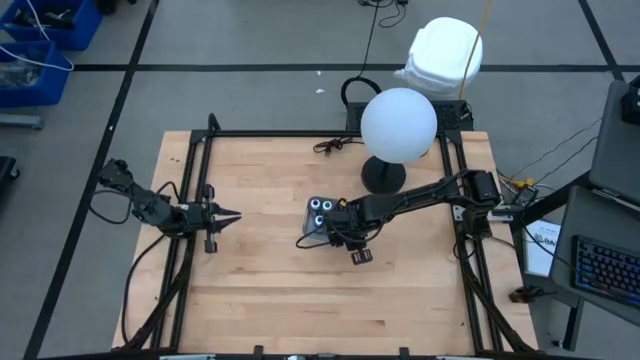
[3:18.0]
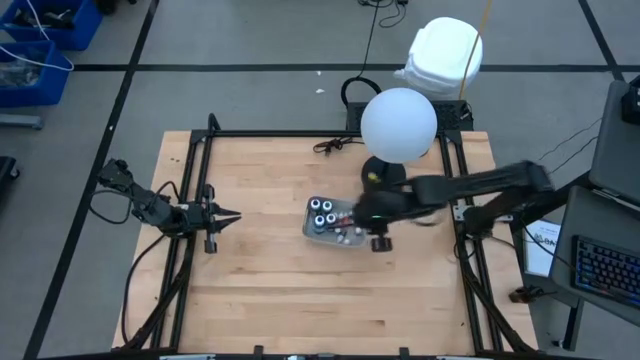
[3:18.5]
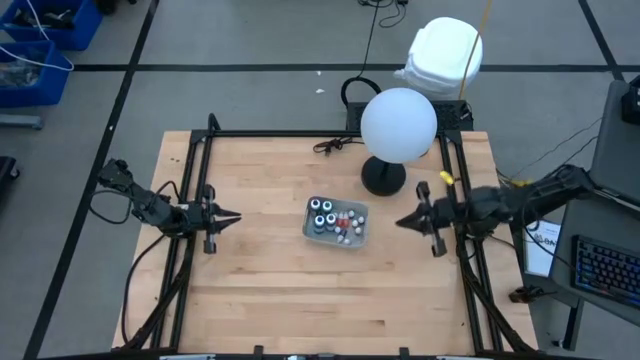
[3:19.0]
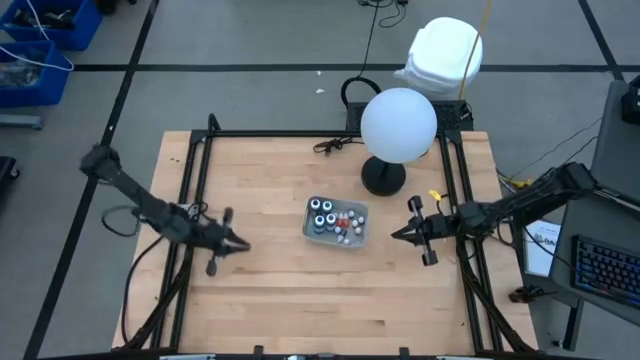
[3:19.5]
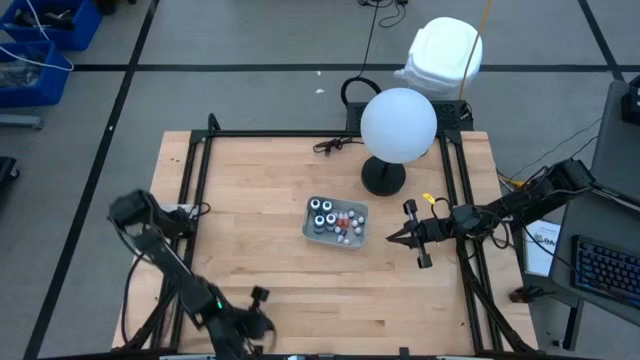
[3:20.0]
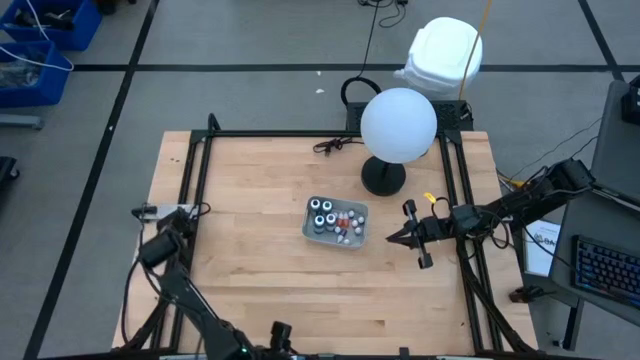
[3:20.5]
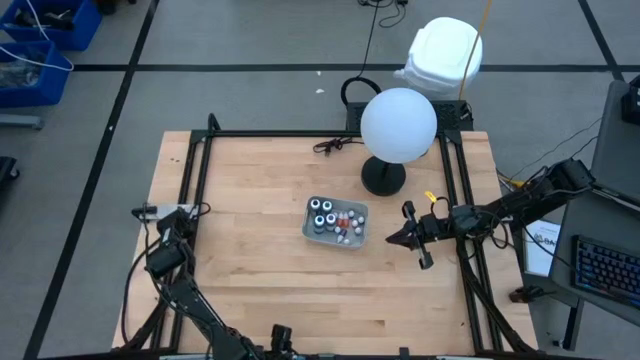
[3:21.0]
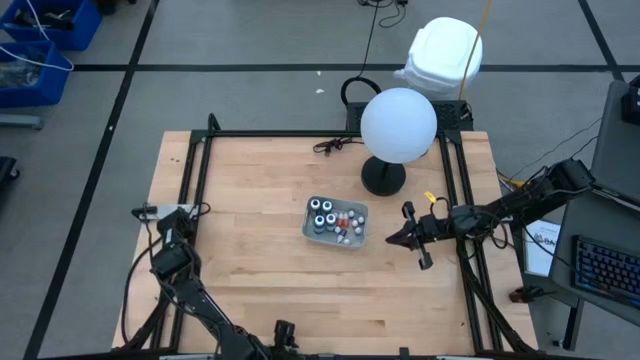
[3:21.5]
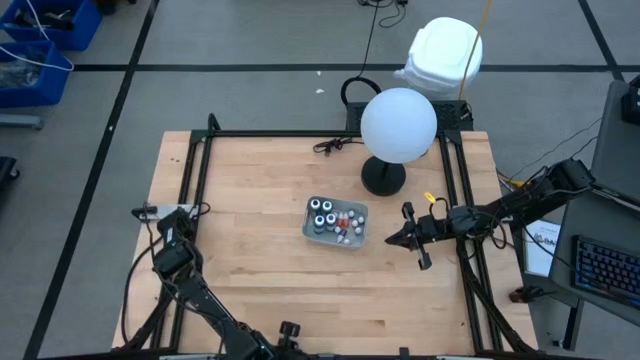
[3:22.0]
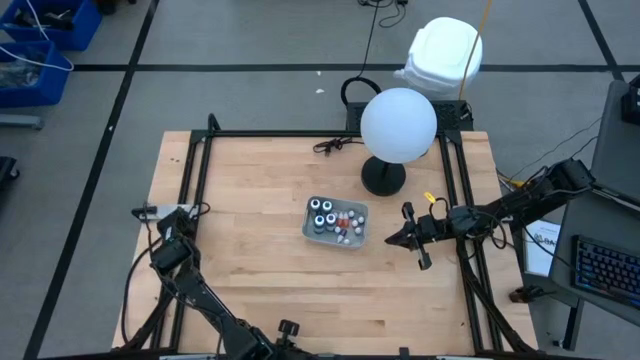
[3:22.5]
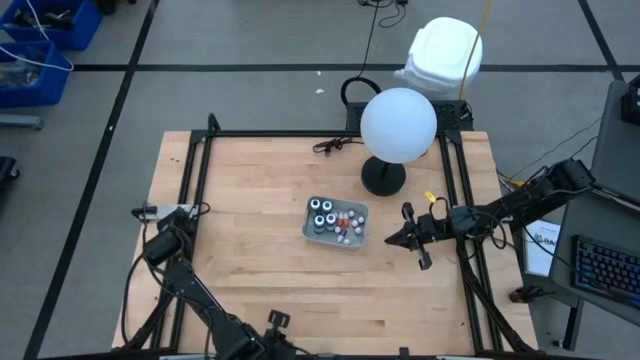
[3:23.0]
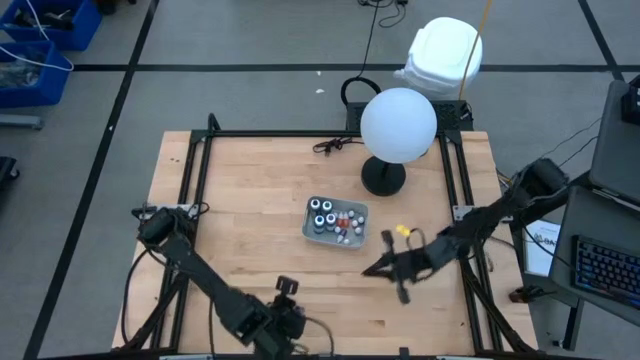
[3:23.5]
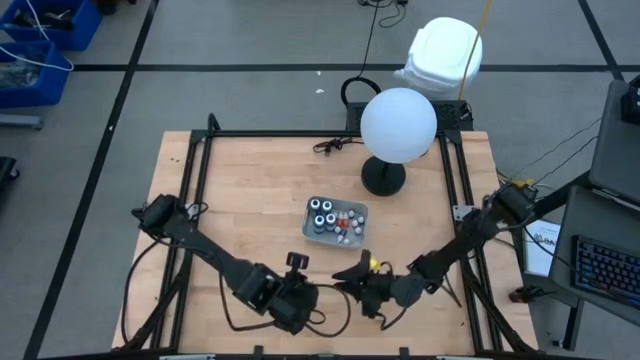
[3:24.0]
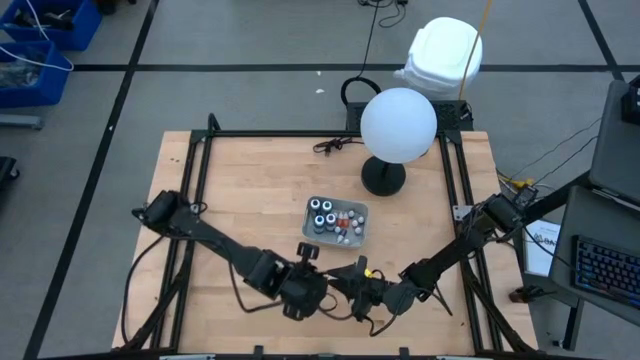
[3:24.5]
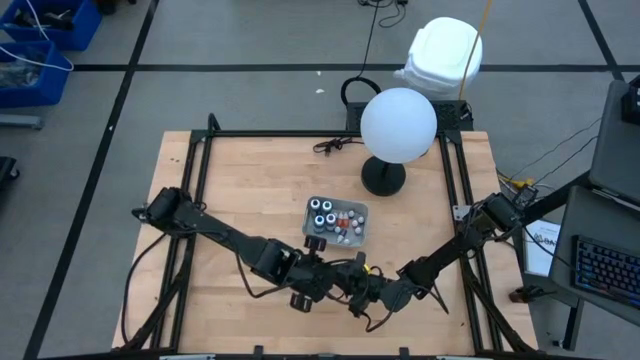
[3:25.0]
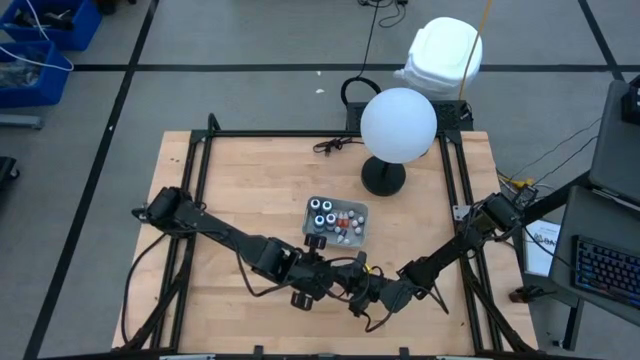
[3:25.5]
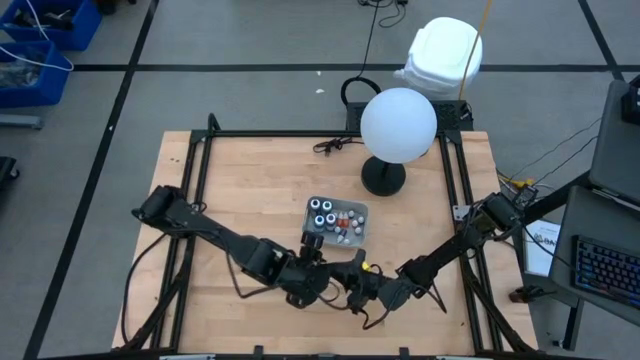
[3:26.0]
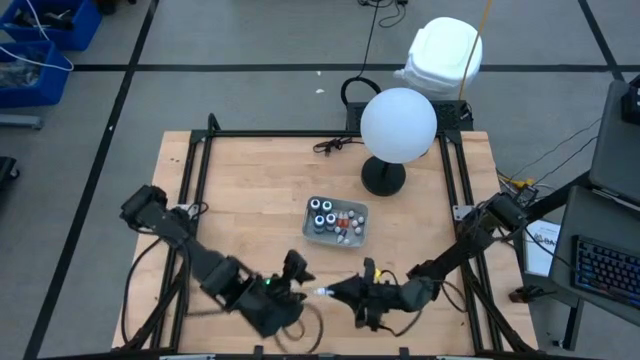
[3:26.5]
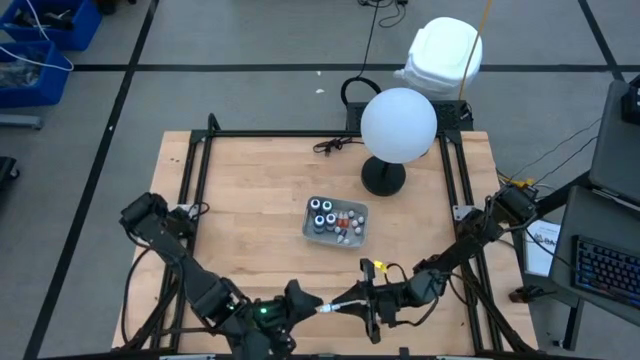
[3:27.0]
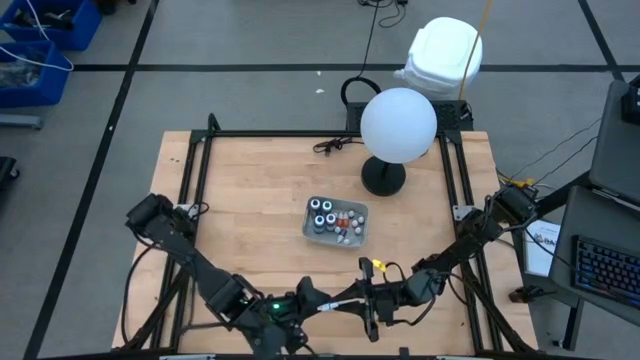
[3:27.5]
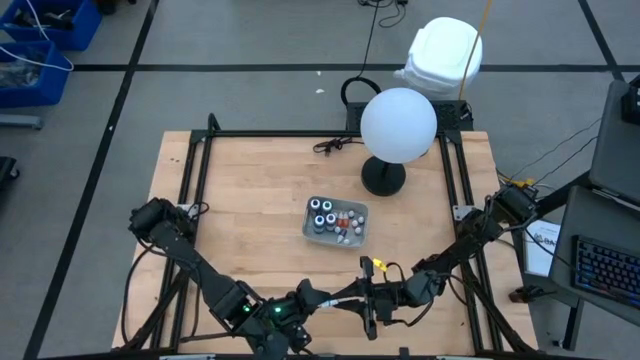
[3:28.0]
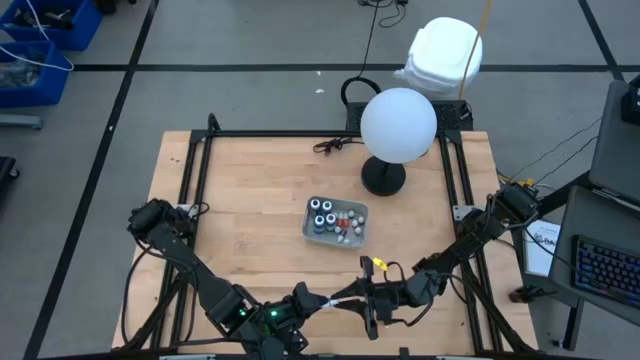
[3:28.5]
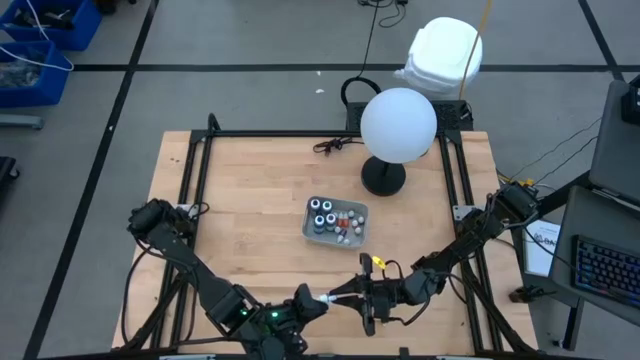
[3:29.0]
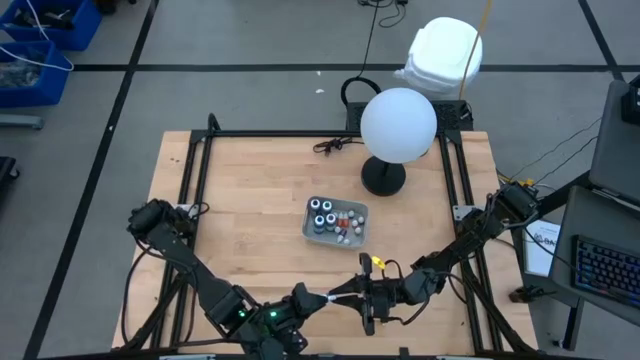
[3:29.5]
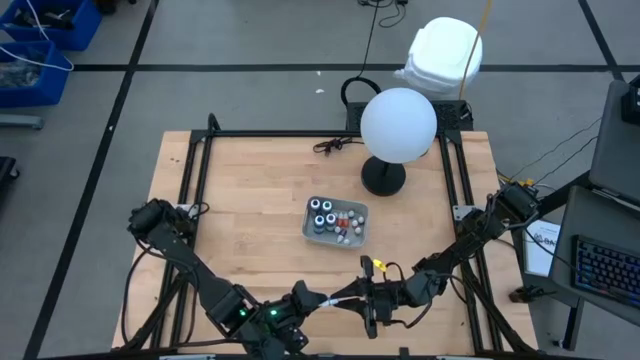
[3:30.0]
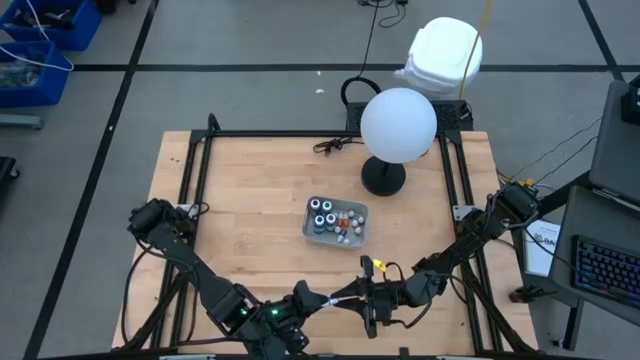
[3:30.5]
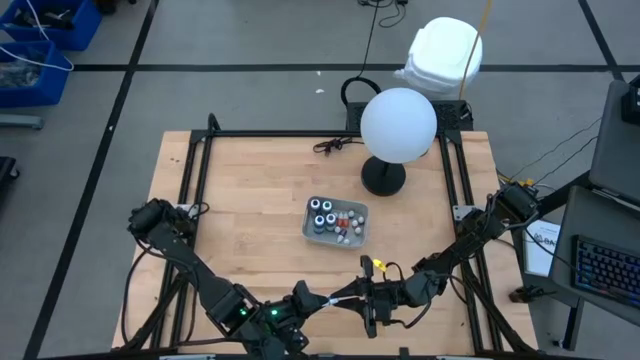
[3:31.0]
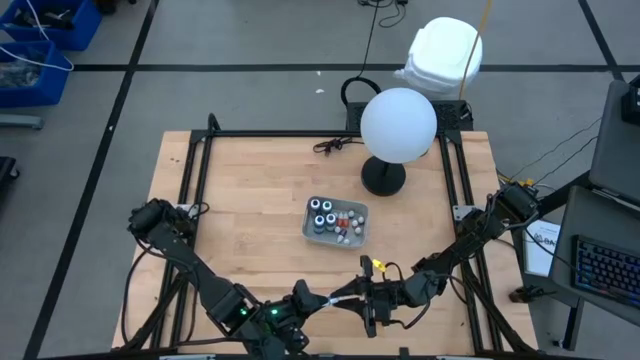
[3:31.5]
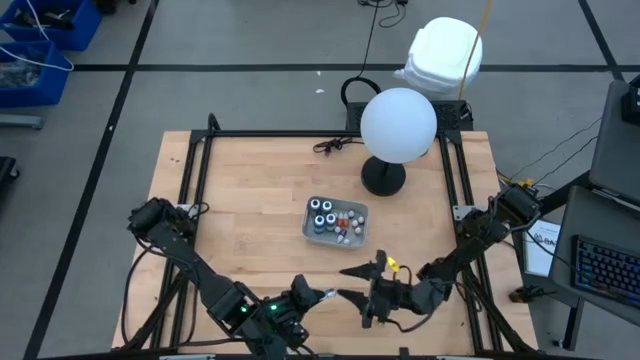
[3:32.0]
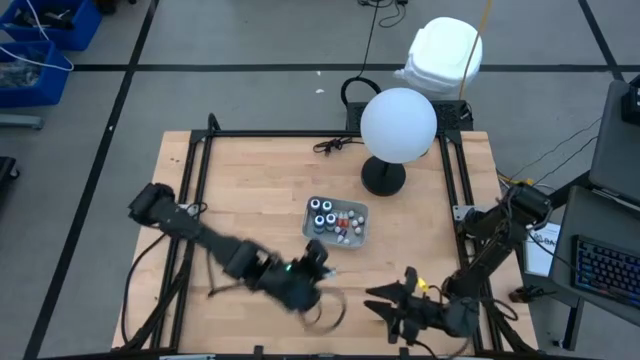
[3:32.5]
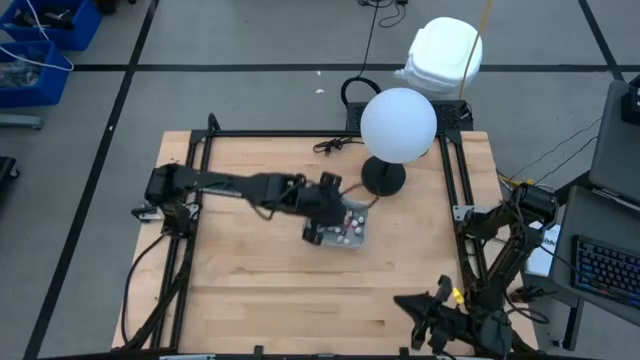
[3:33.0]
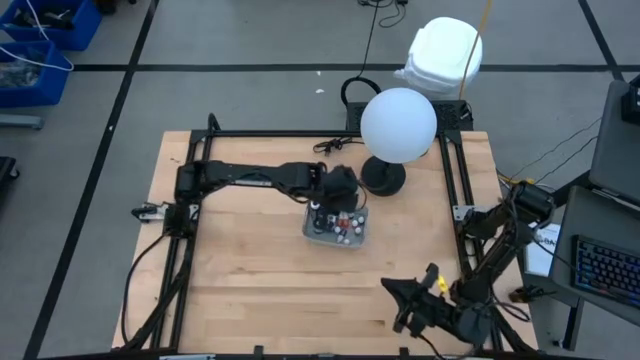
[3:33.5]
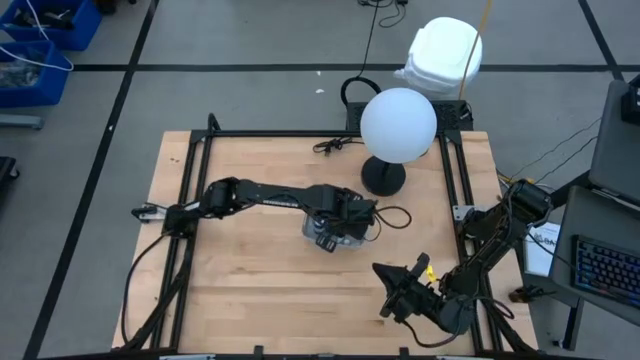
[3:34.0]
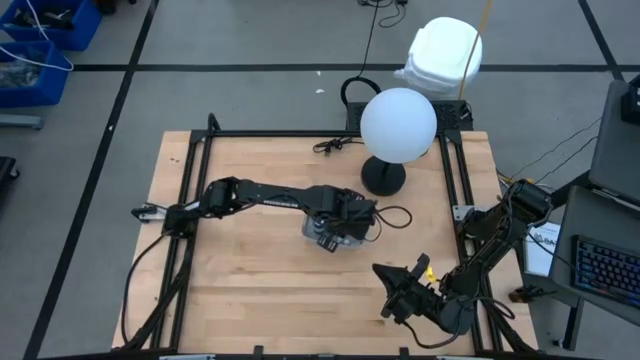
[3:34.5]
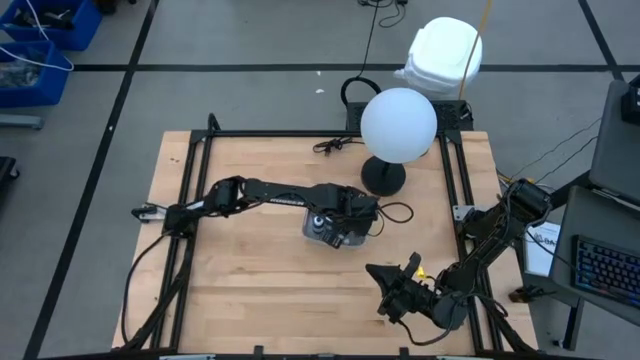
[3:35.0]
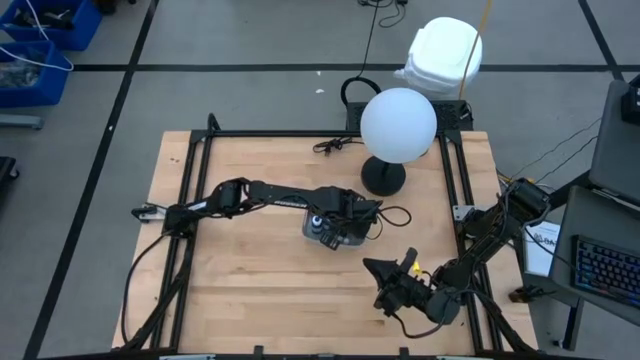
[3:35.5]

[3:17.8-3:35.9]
Task: Pick & Place food coloring
Put the small dark blue food coloring bottle into the gray bin

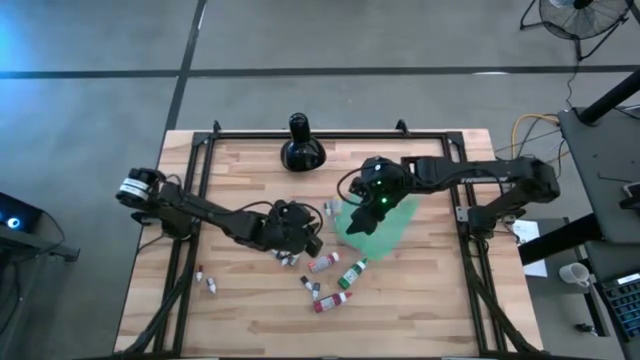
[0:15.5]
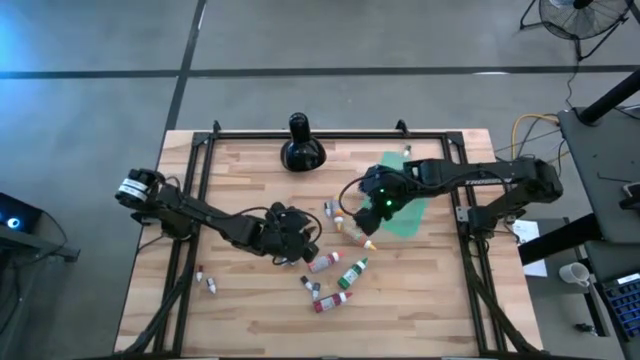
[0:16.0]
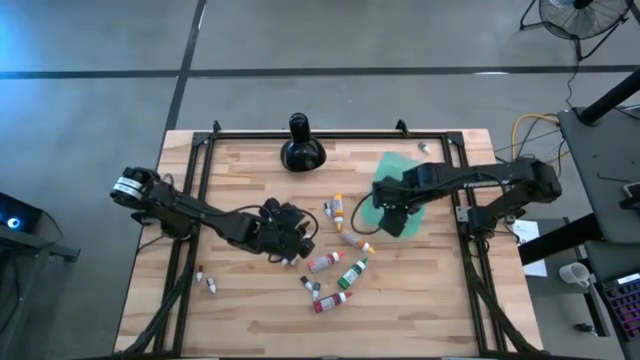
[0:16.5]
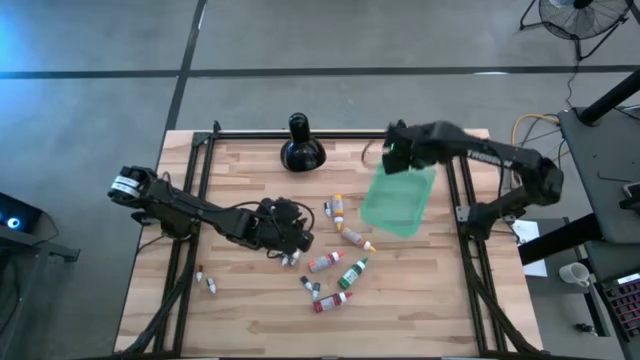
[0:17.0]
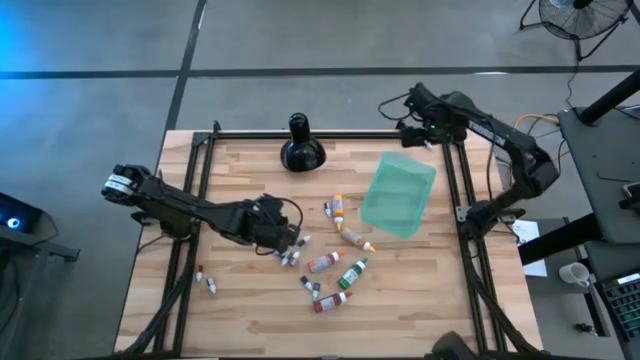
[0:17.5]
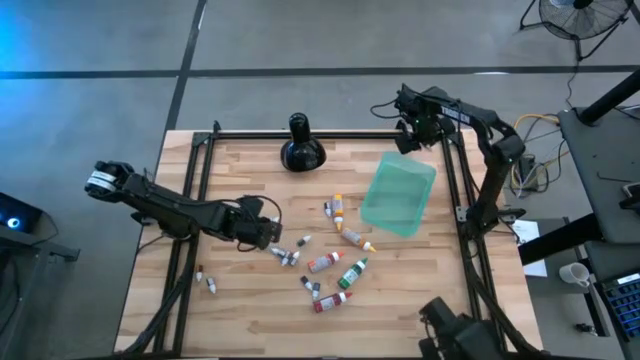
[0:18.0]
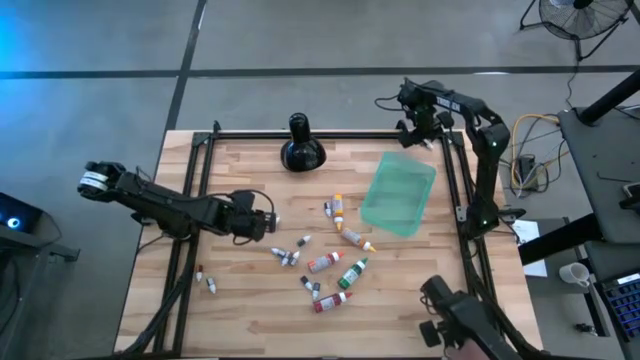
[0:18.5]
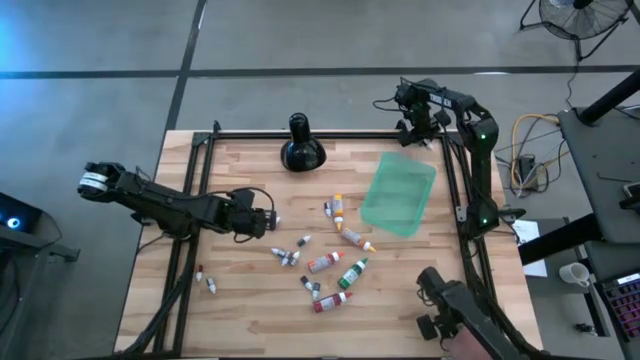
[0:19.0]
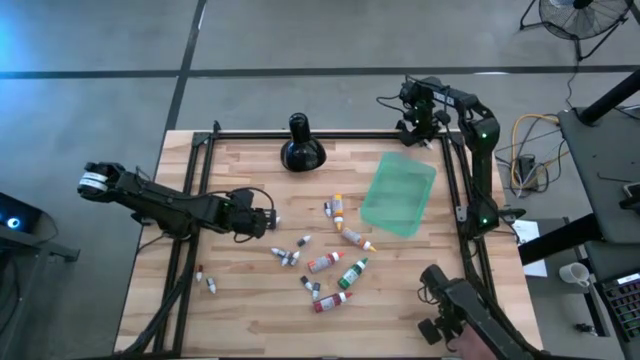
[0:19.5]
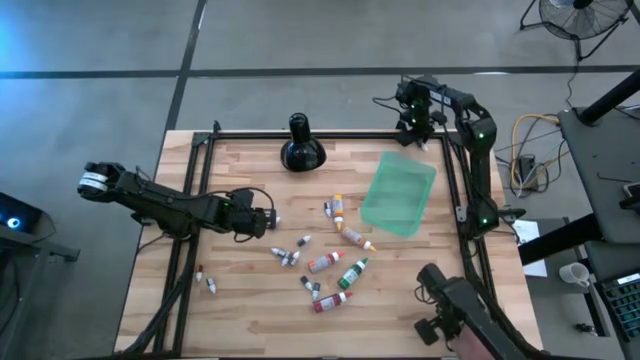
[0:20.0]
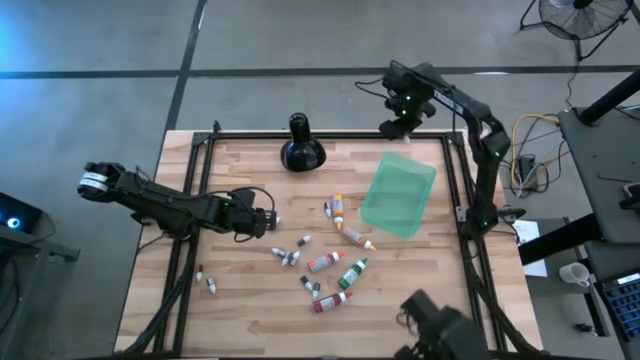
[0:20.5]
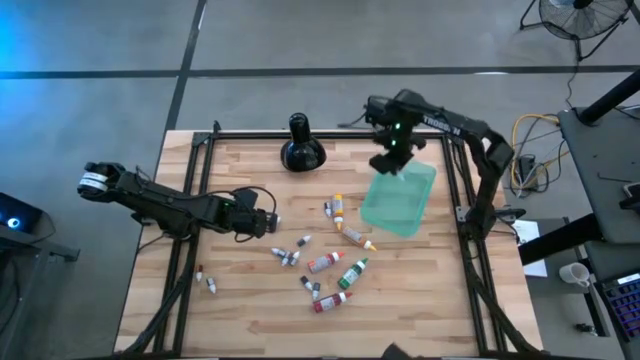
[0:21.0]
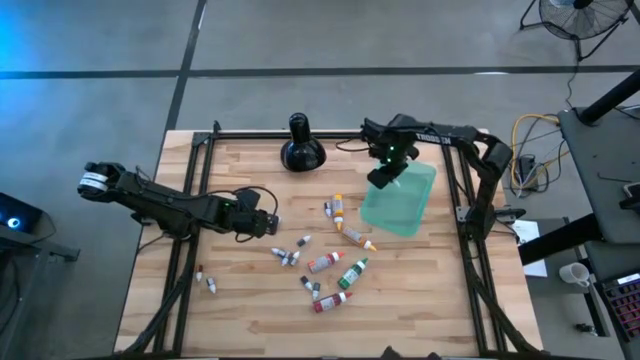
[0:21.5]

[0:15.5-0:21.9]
Task: Pick & Place food coloring
Put the top small black food coloring bottle into the green bin
